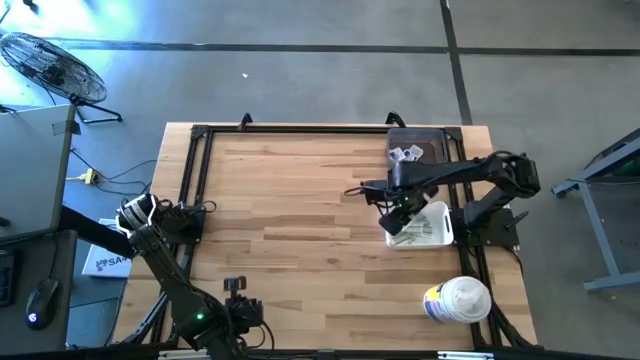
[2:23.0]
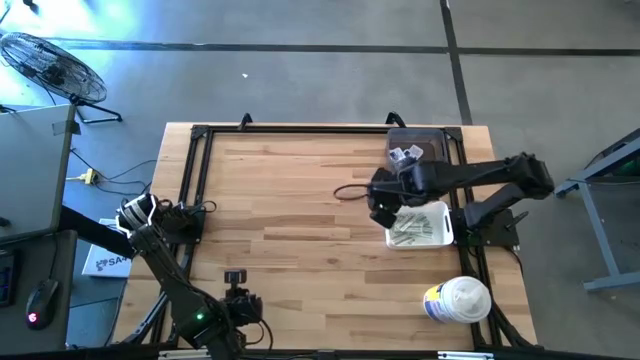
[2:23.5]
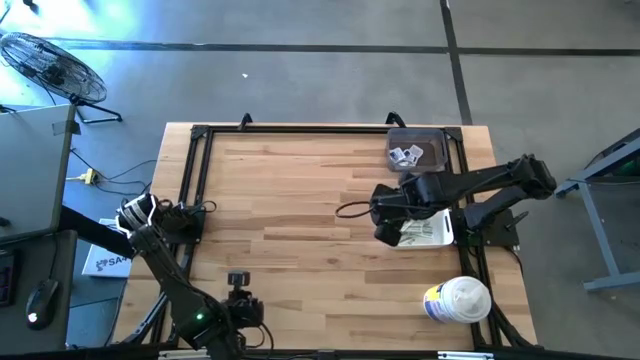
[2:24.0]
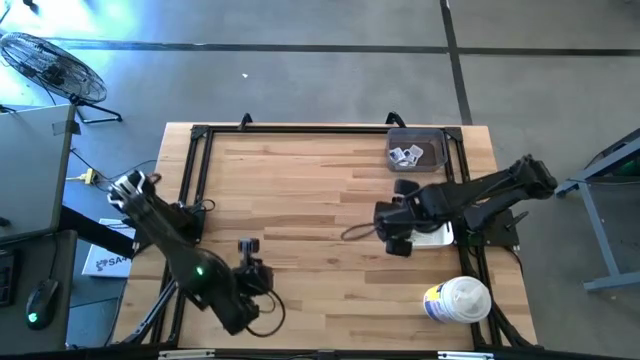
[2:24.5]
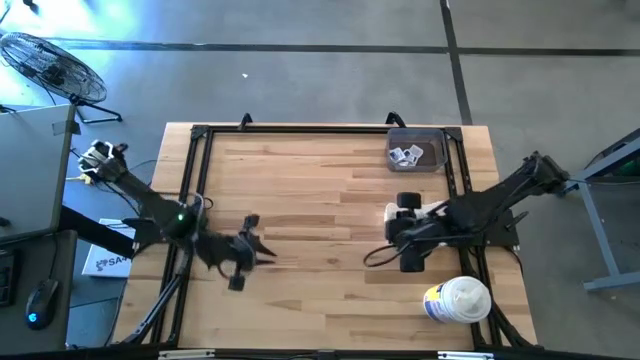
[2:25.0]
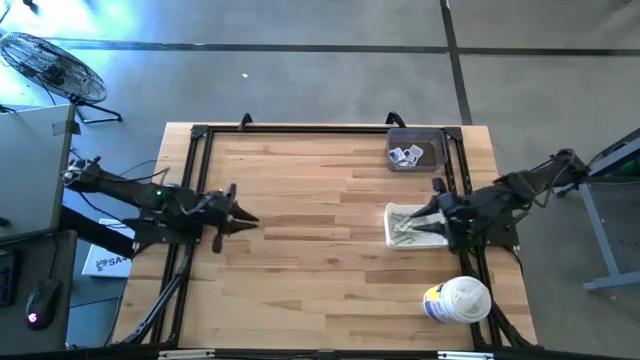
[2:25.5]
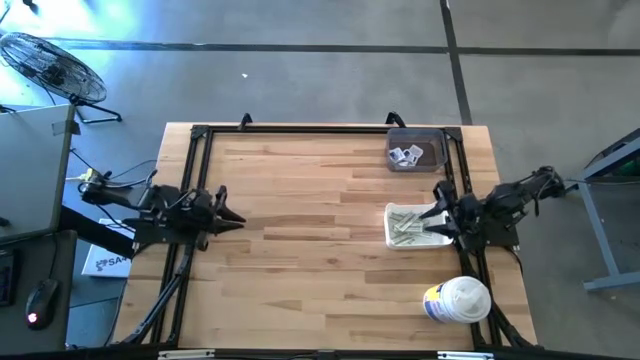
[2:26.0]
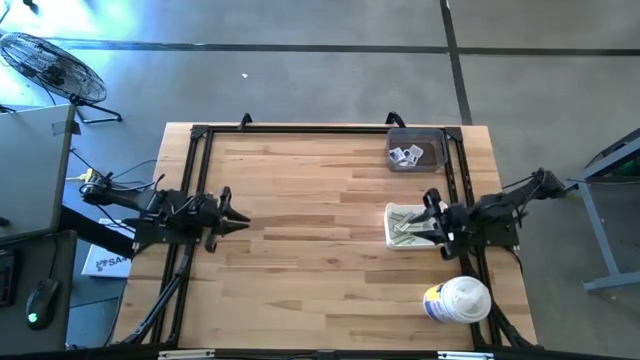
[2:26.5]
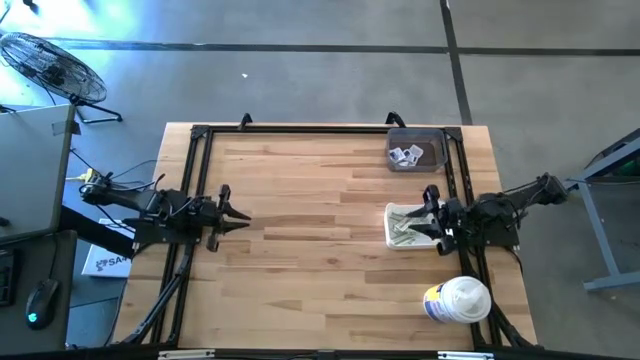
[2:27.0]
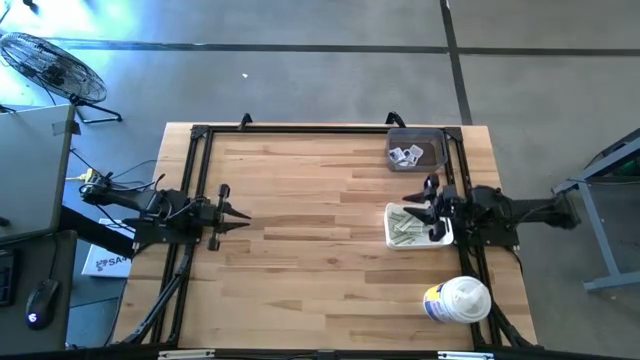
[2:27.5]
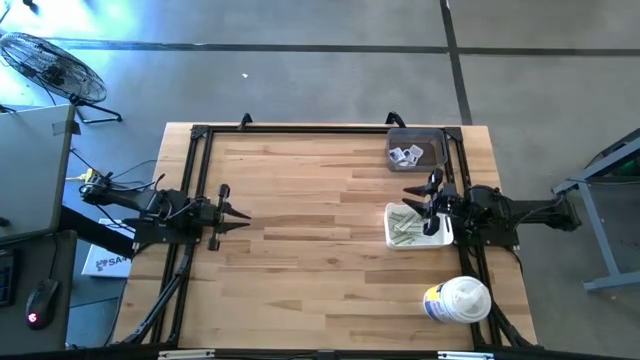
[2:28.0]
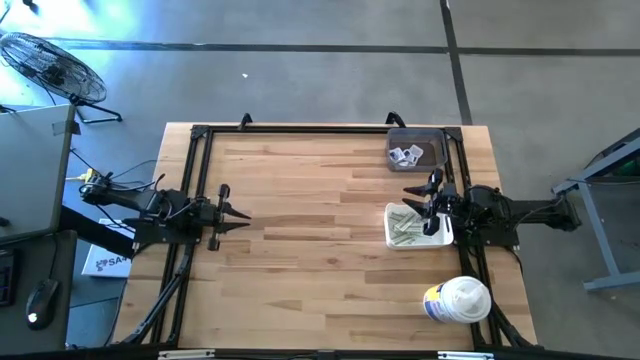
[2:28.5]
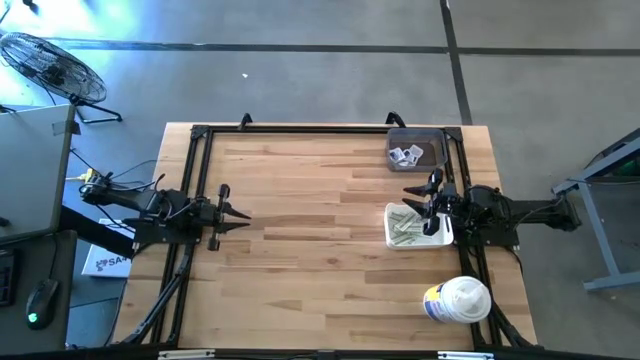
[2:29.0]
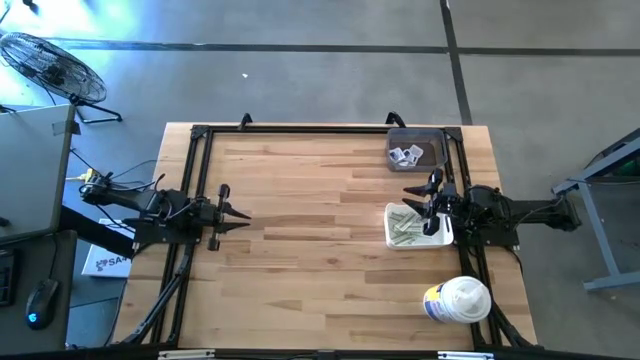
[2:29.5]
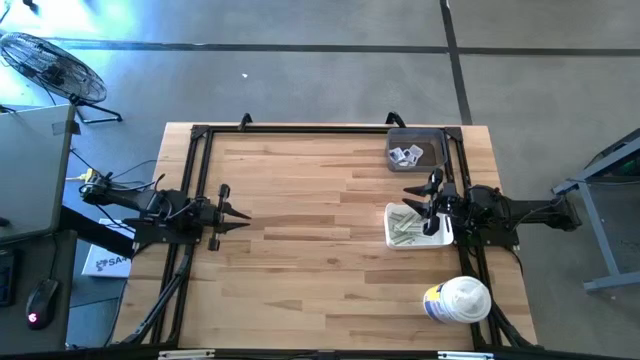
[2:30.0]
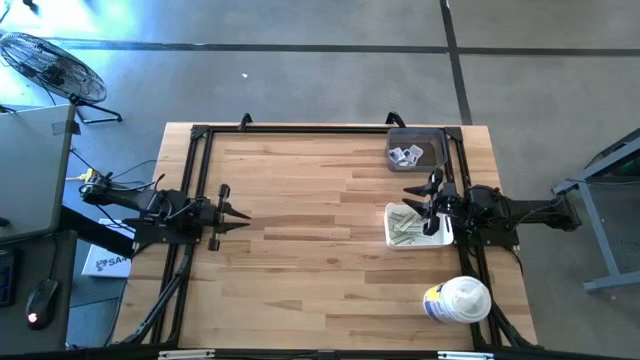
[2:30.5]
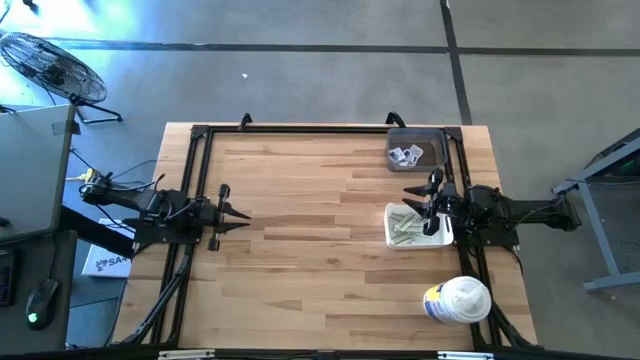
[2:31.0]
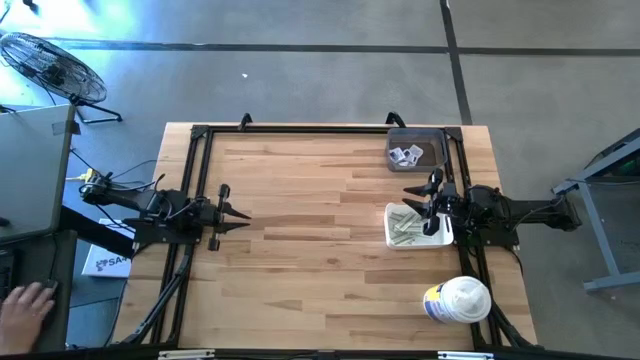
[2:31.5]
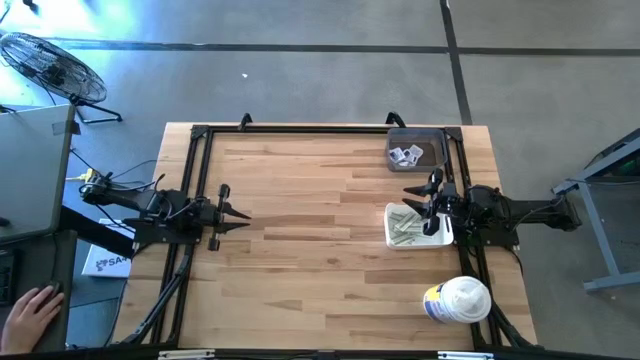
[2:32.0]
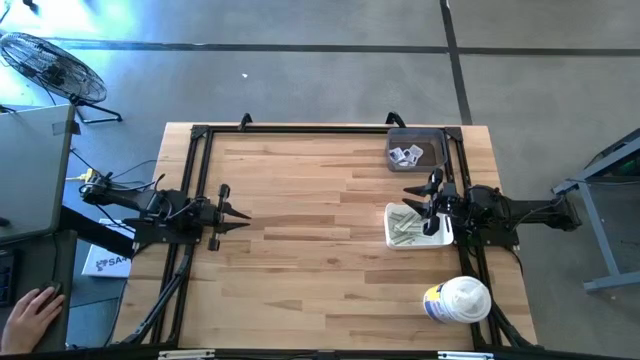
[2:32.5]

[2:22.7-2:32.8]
Task: Pick & Place First Aid Supplies
Return to Home Position

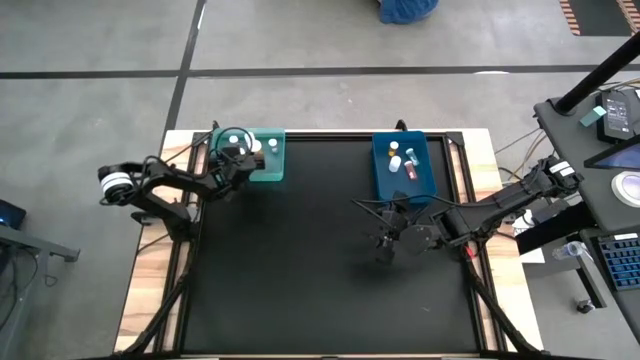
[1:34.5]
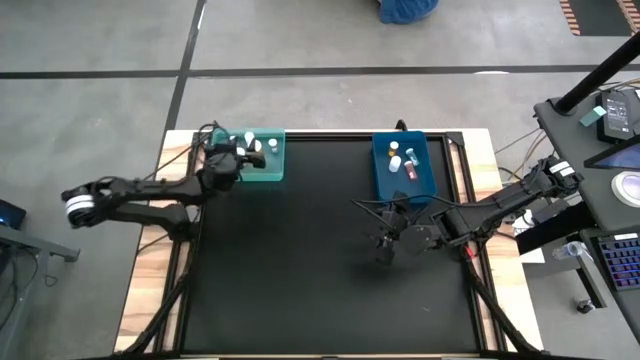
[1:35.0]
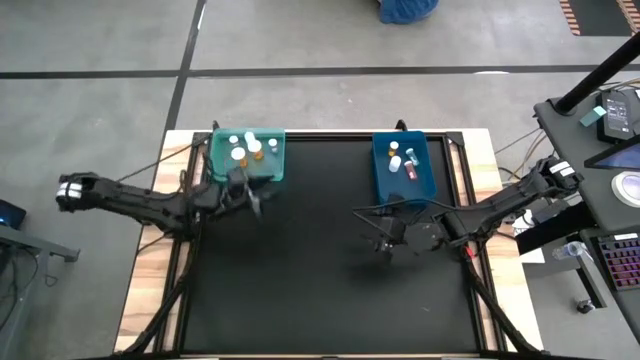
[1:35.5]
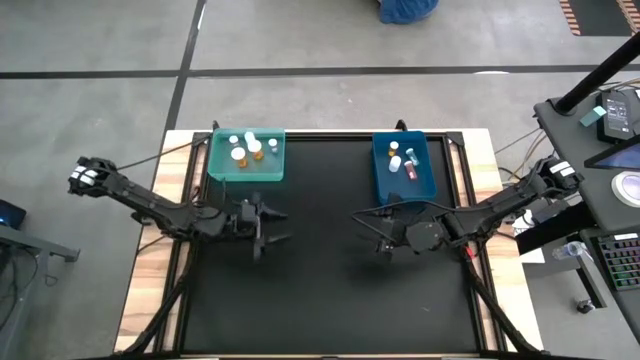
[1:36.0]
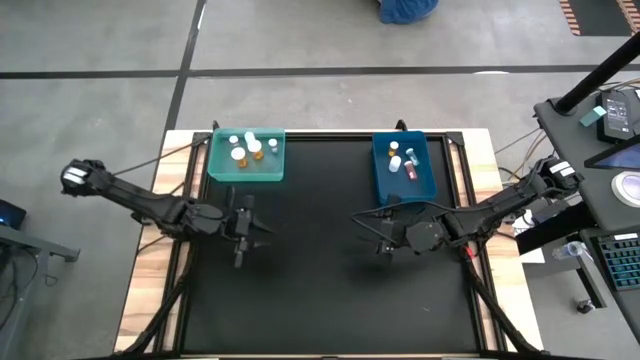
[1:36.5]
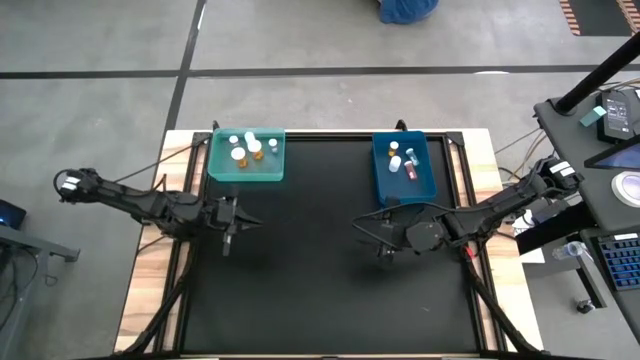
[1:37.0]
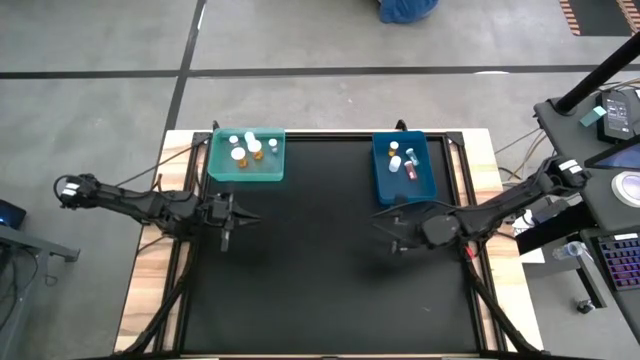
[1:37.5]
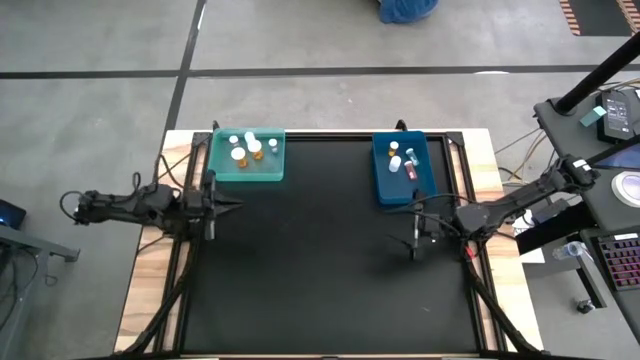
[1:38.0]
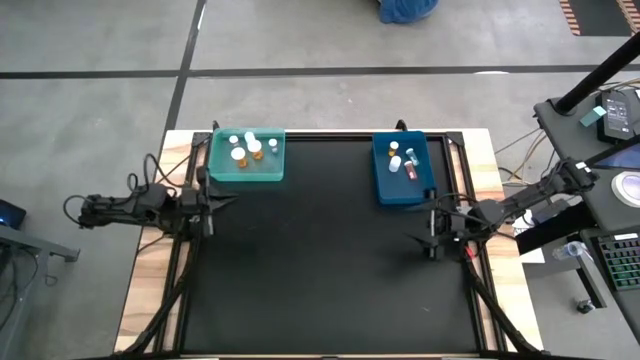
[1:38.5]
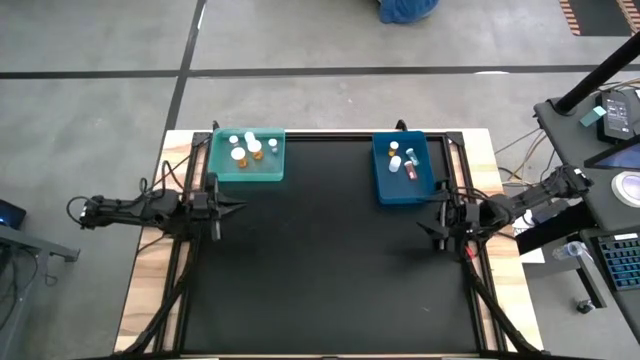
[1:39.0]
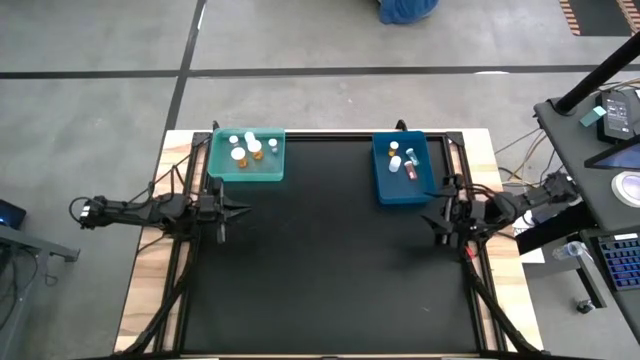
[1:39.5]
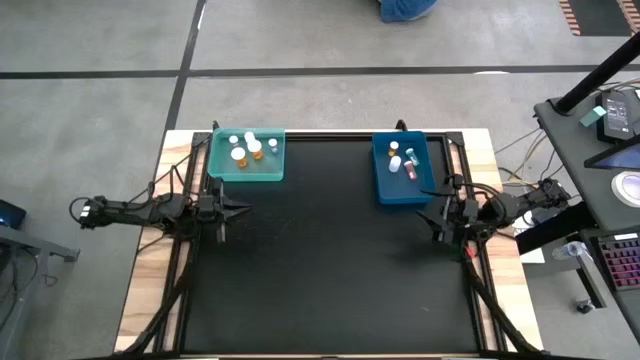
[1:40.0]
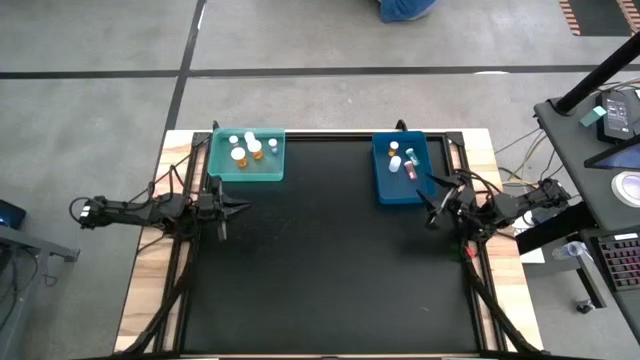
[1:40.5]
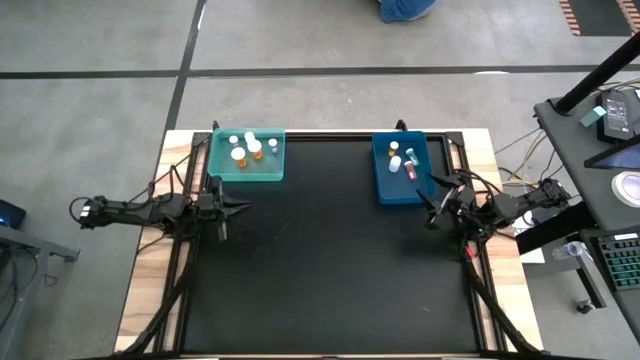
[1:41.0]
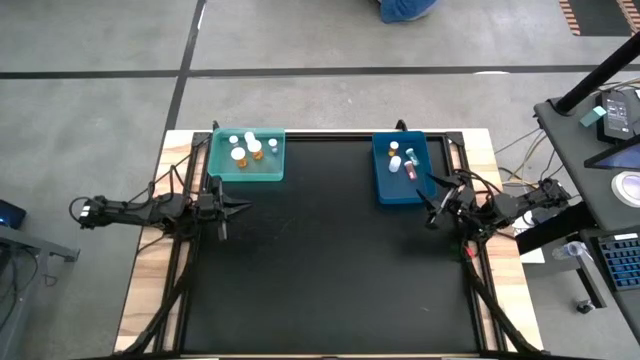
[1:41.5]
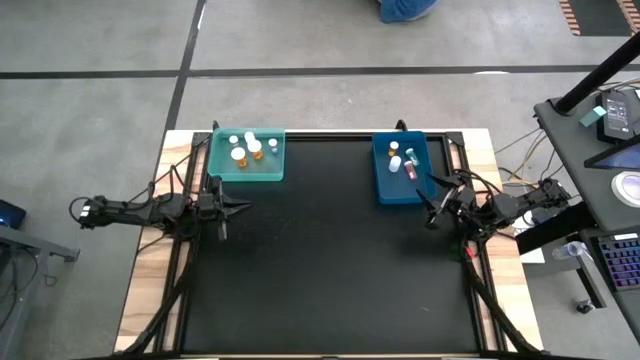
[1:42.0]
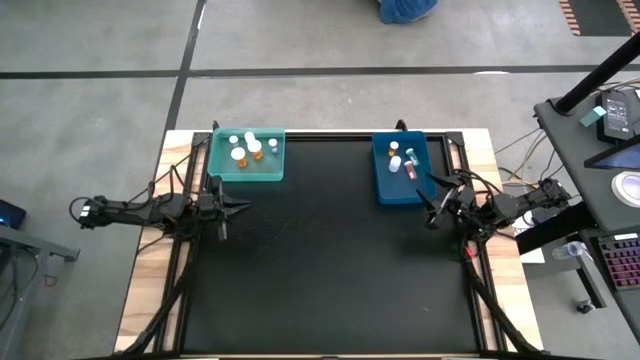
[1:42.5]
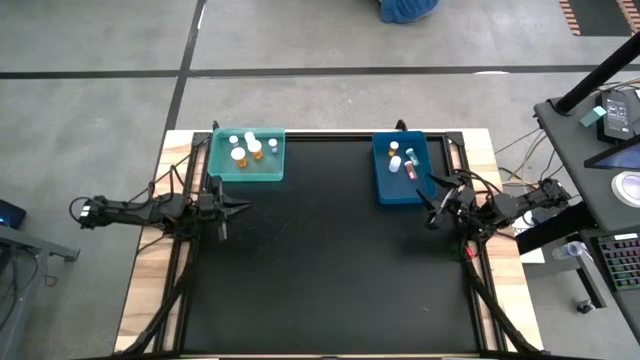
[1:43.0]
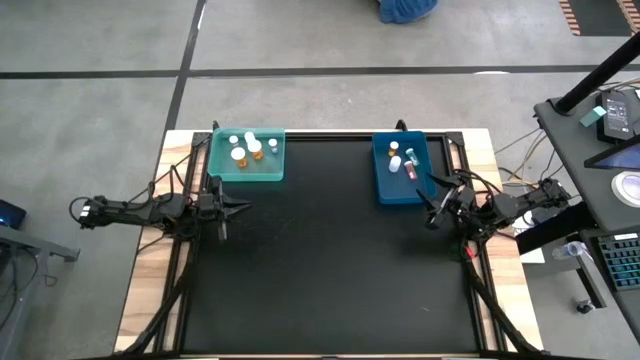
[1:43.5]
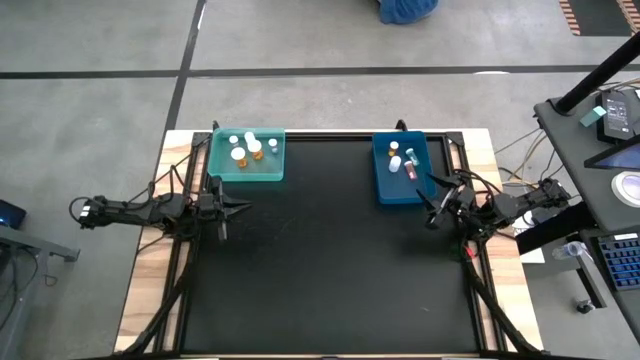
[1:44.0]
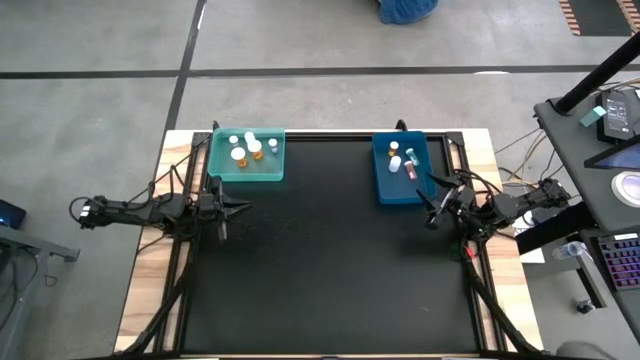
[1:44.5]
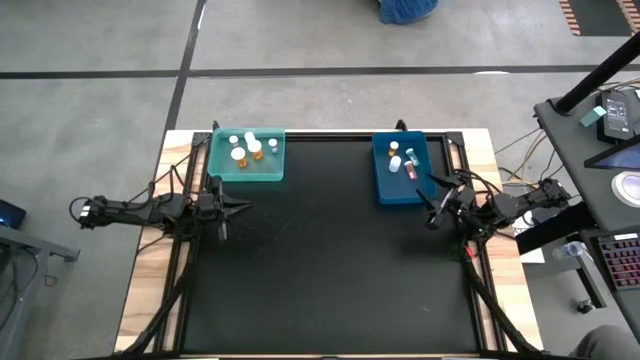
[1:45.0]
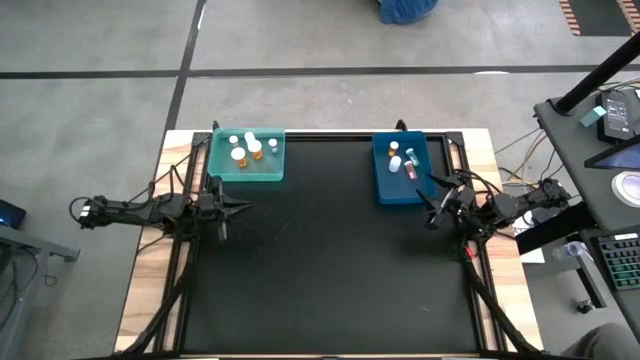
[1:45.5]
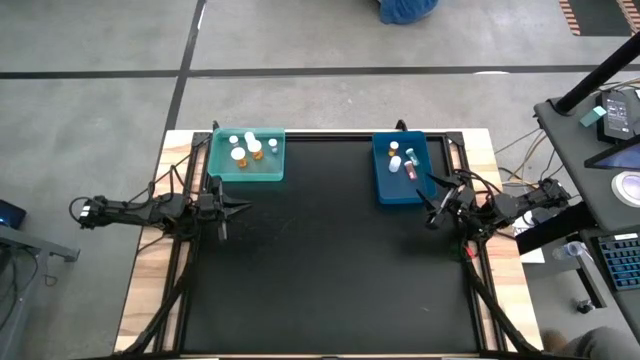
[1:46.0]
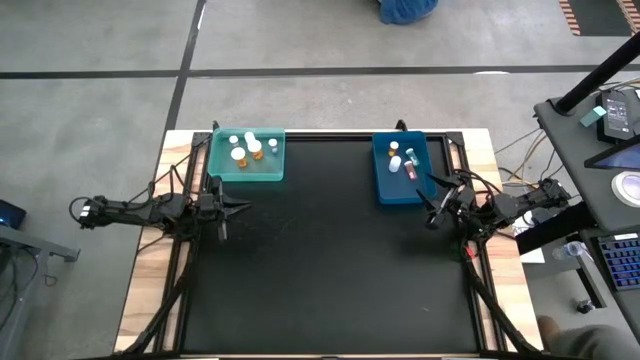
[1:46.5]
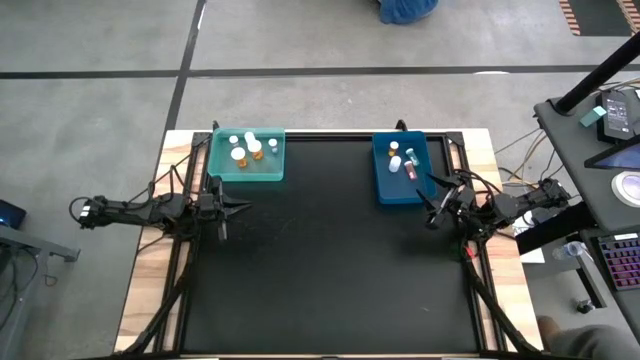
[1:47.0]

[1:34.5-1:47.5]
Task: Pick and place medicine bottles into bin by pill shape (circle, oval)
Return to Home Position
